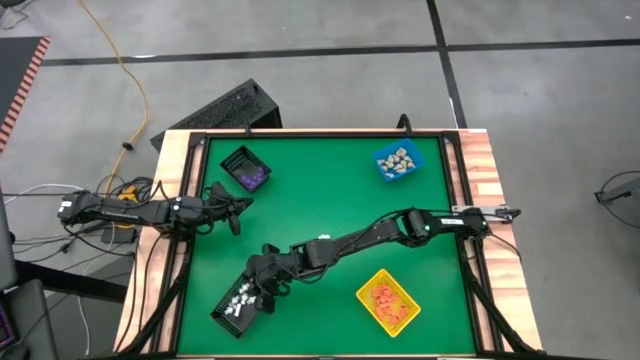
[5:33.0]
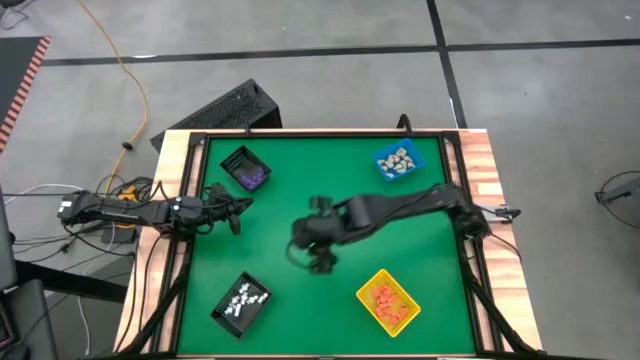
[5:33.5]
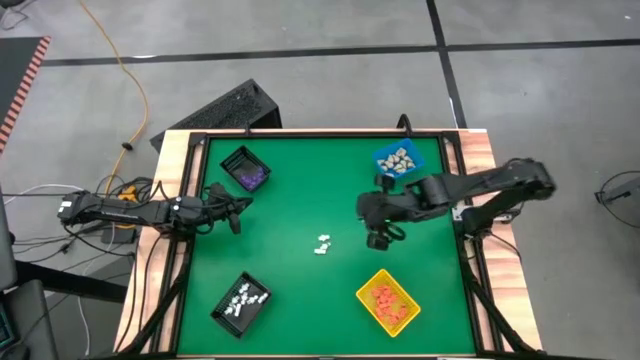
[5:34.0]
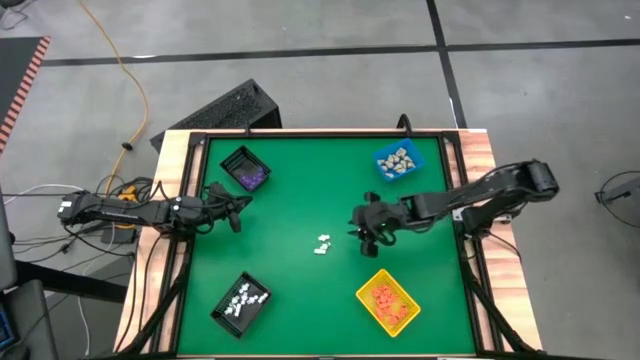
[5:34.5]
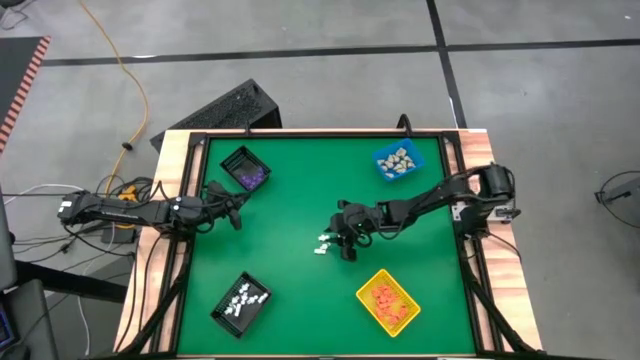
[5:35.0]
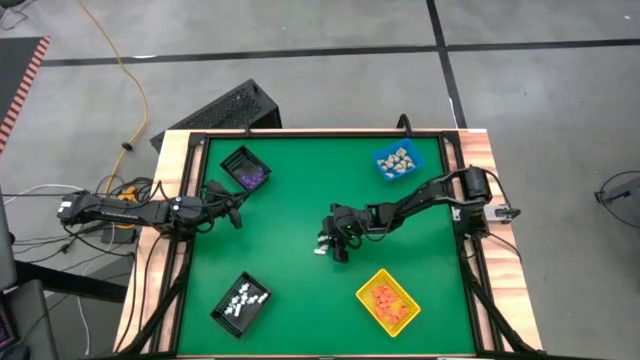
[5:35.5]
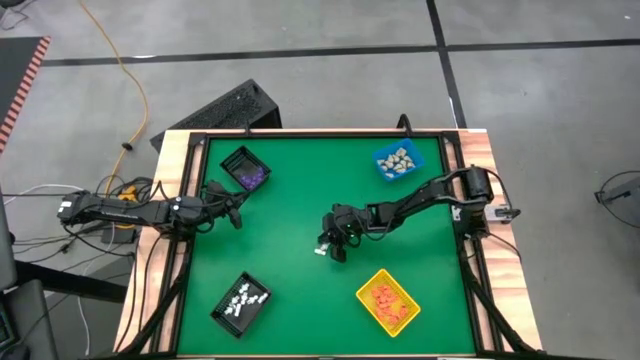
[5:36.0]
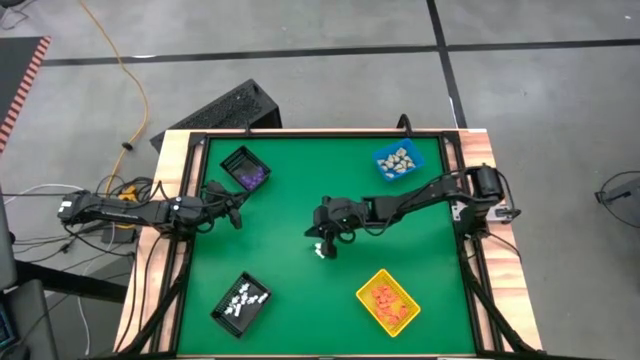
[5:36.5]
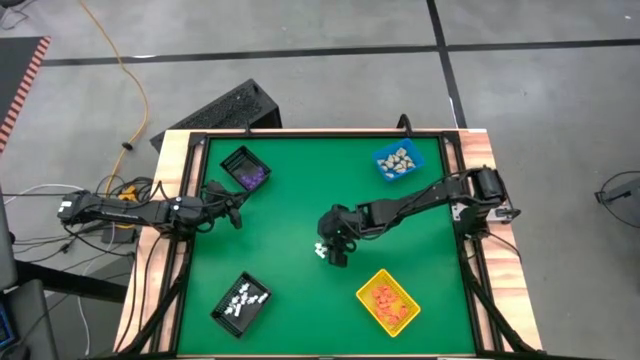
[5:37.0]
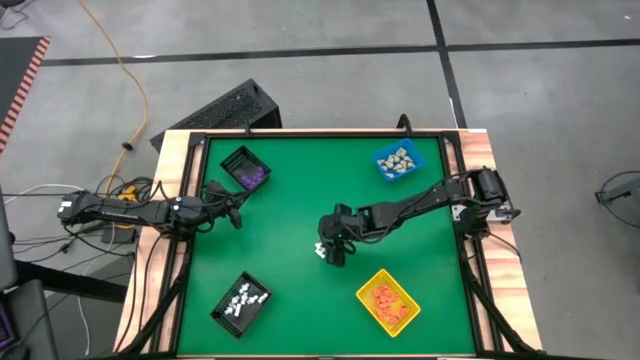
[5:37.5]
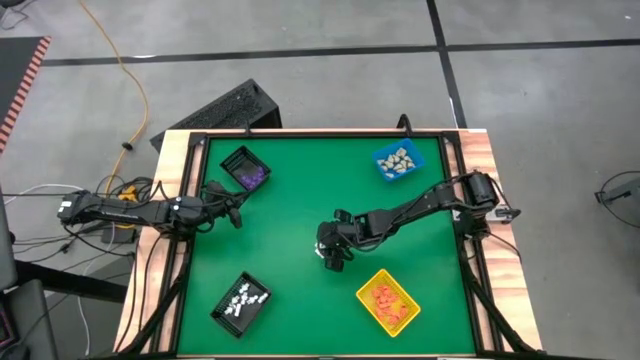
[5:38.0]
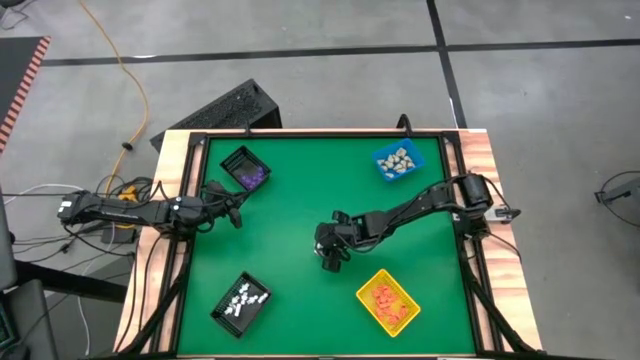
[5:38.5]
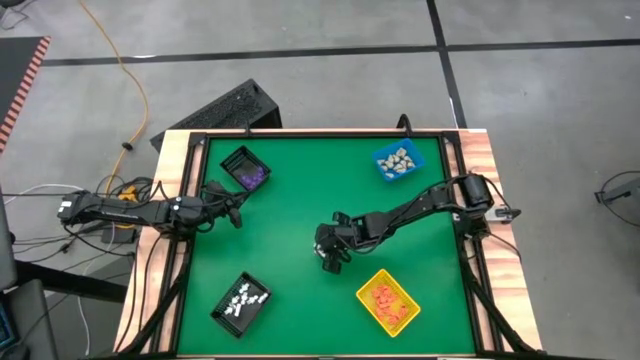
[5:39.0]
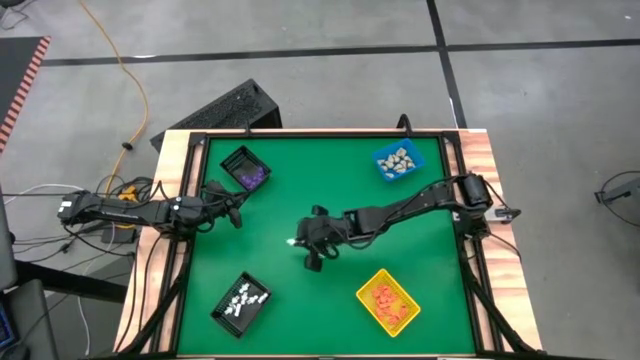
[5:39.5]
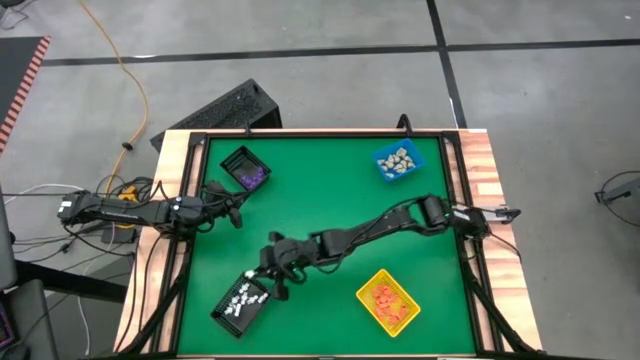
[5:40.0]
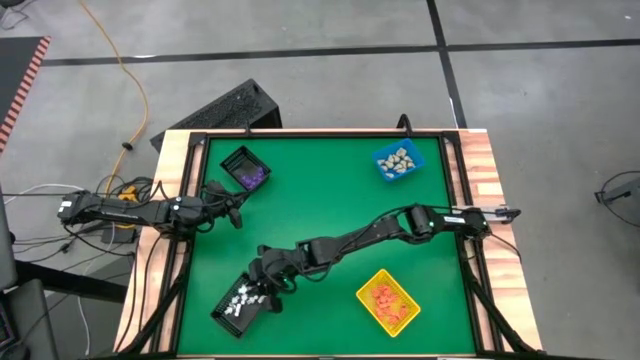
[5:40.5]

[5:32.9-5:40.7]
Task: Sort Halloween decoration
Put the white skeleton toy into the bottom black basket

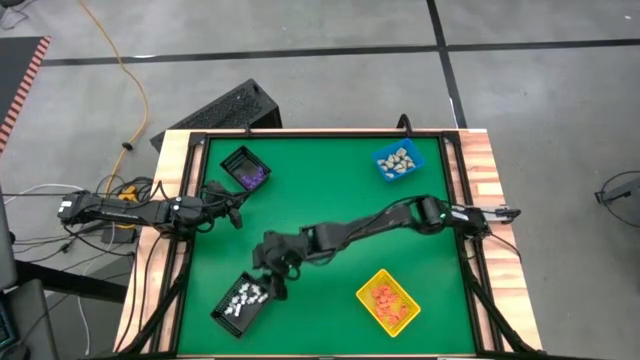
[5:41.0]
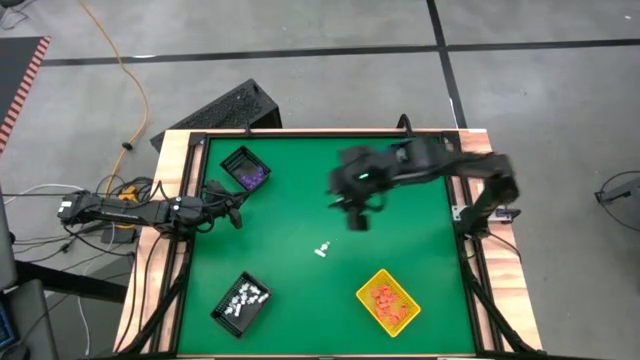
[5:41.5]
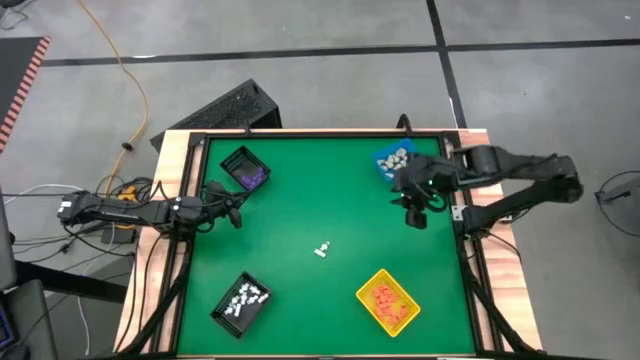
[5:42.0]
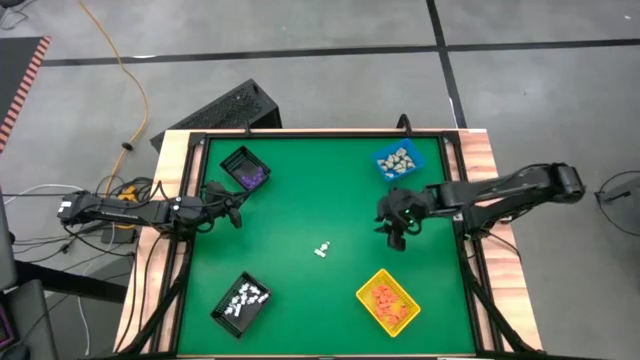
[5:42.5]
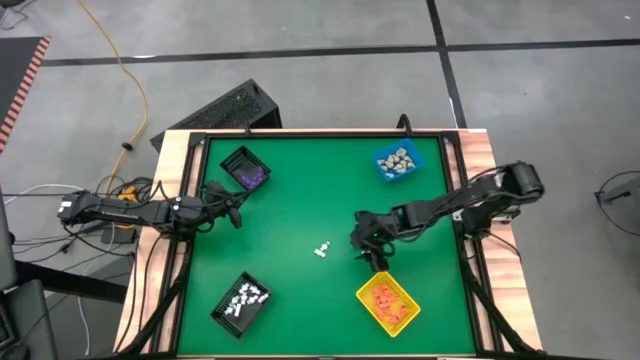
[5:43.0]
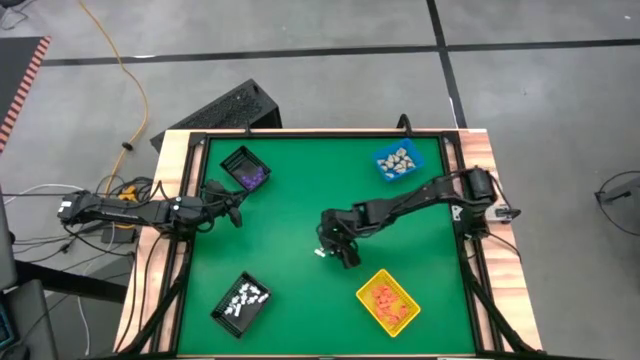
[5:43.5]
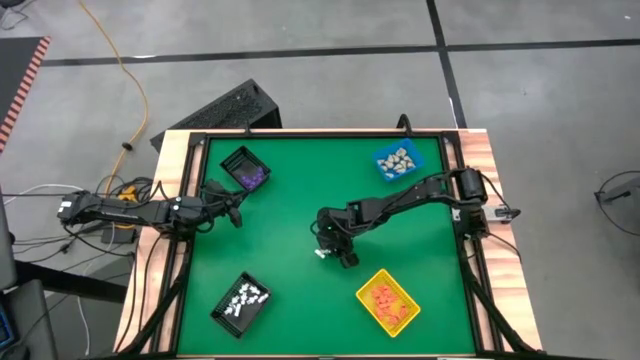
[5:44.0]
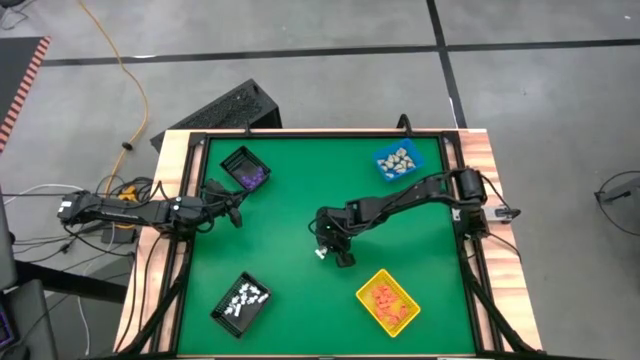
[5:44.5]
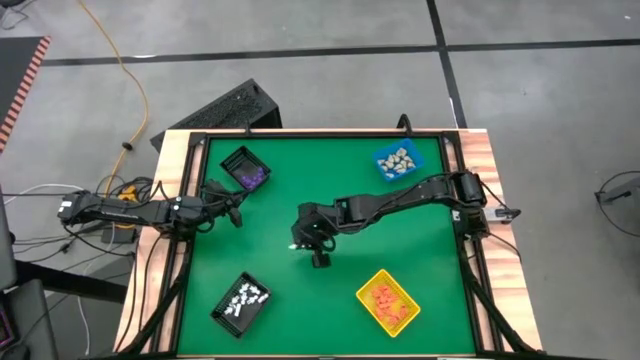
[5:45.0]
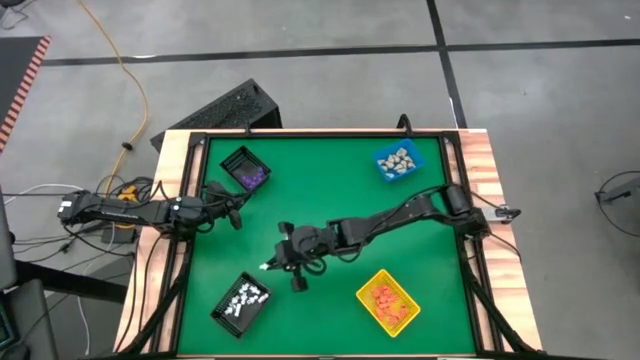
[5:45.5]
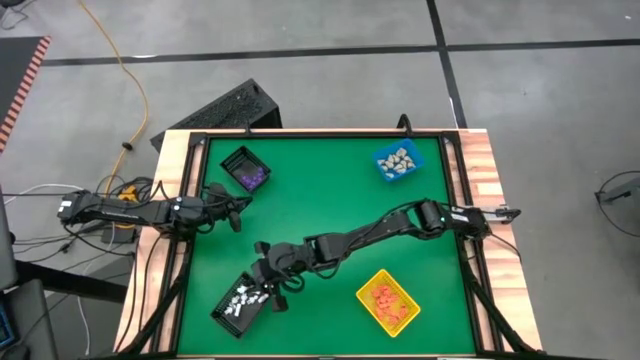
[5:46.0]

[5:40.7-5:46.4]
Put the white skeleton toy into the bottom black basket

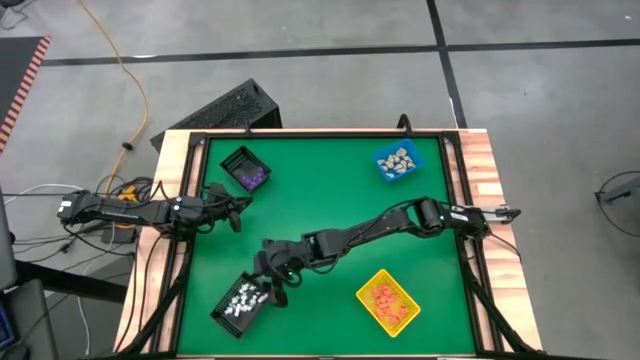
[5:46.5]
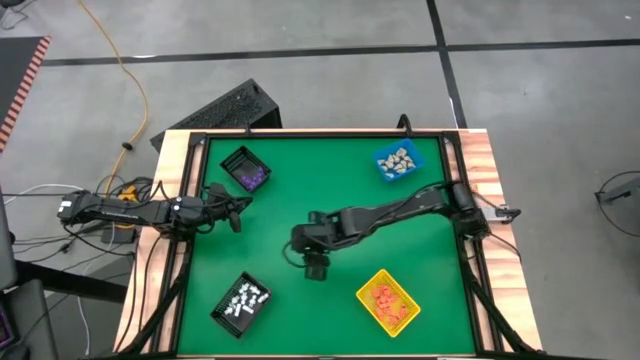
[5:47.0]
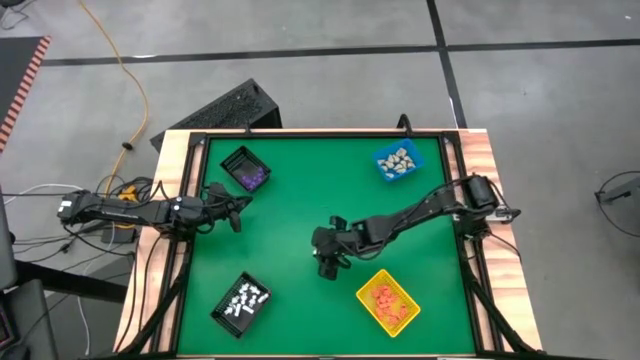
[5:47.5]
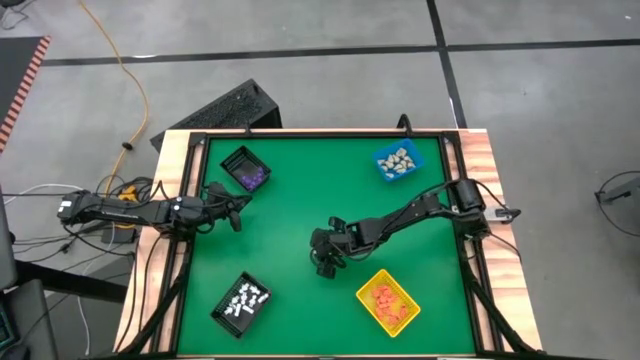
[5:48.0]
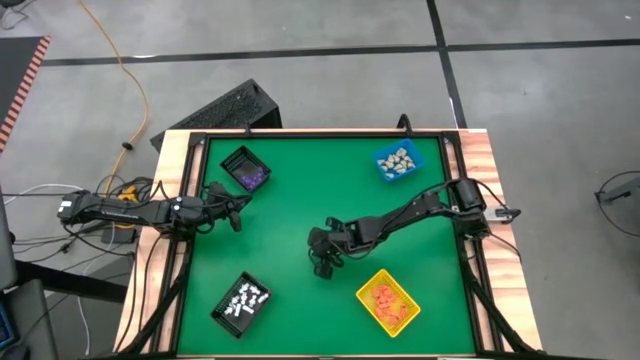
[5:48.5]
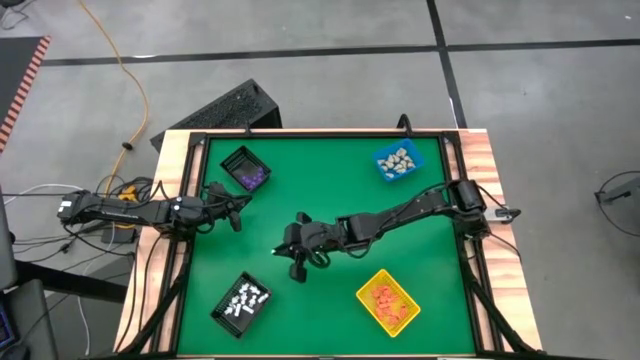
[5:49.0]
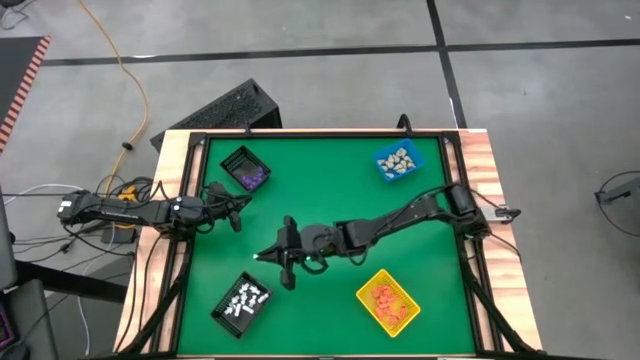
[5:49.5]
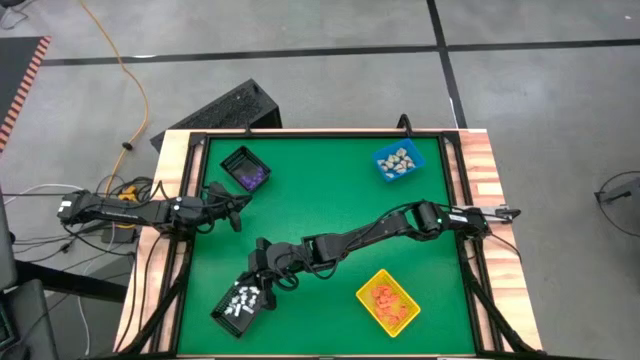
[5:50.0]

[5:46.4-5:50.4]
Put the white skeleton toy into the bottom black basket

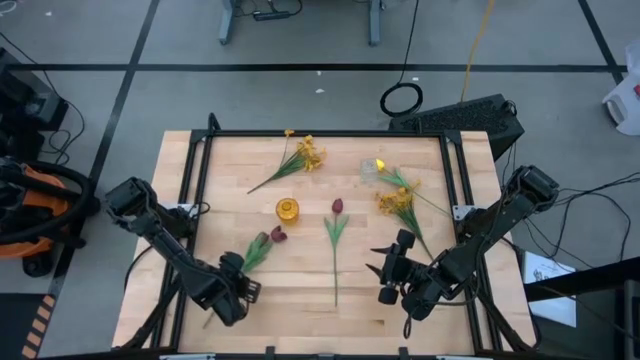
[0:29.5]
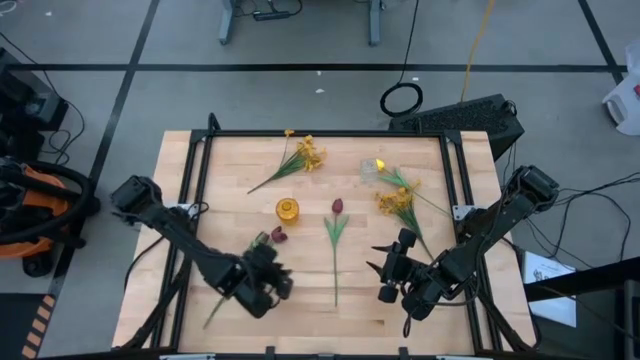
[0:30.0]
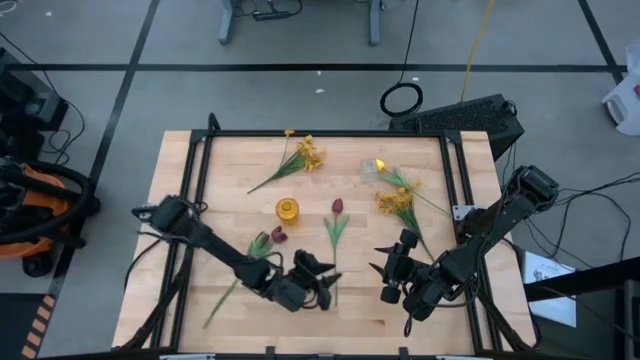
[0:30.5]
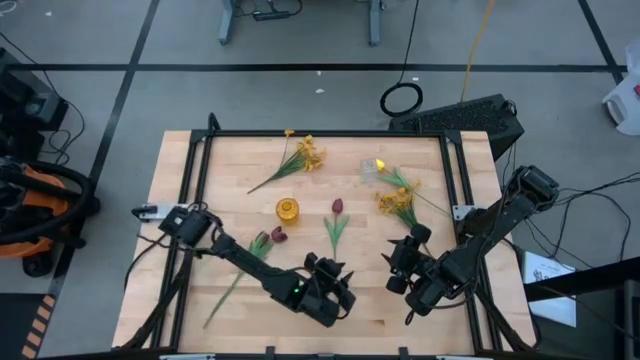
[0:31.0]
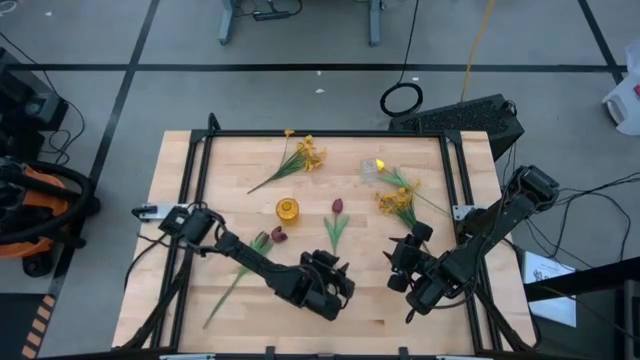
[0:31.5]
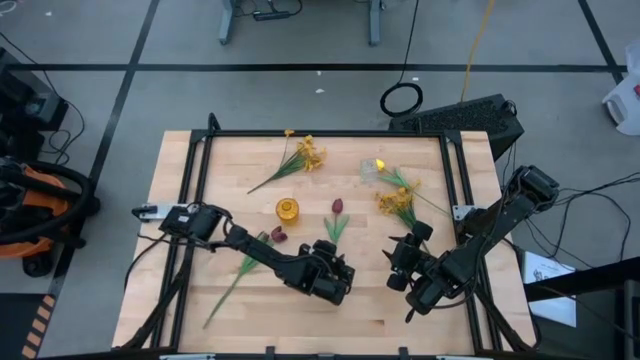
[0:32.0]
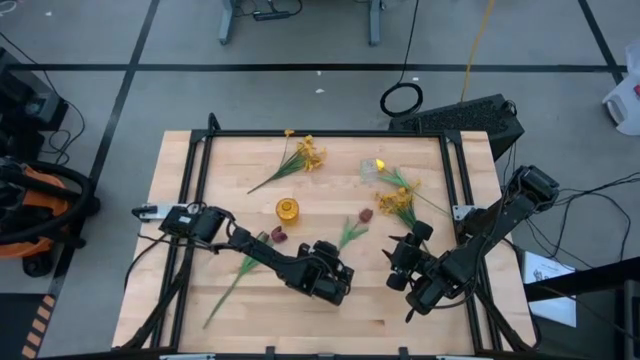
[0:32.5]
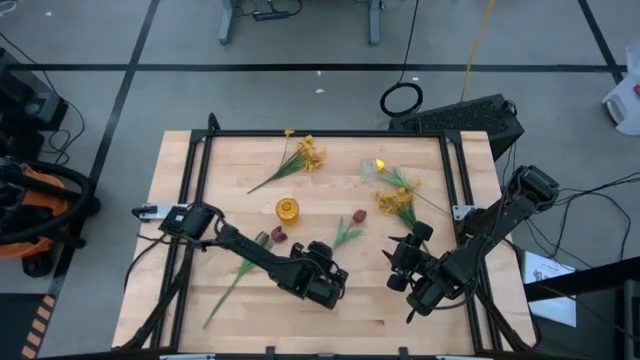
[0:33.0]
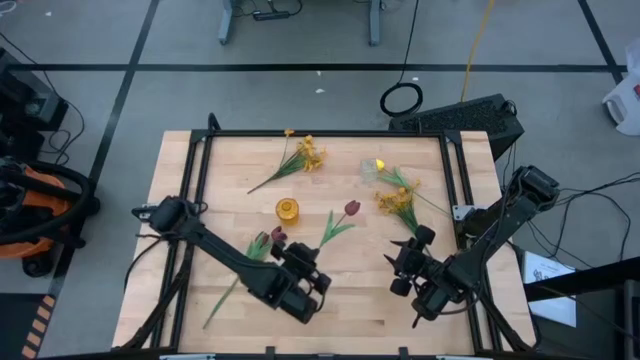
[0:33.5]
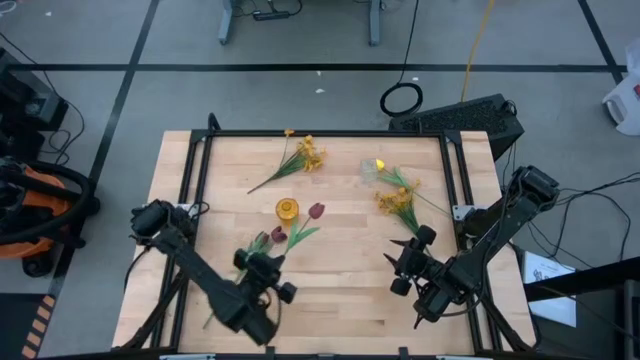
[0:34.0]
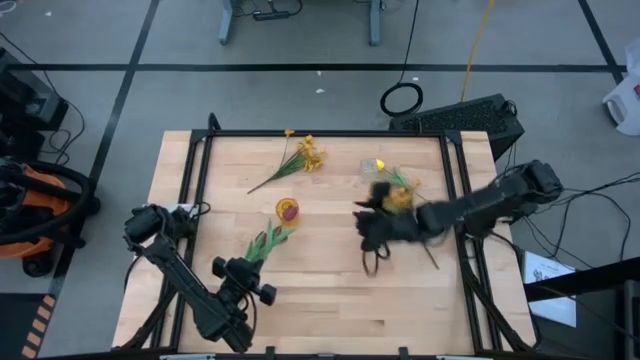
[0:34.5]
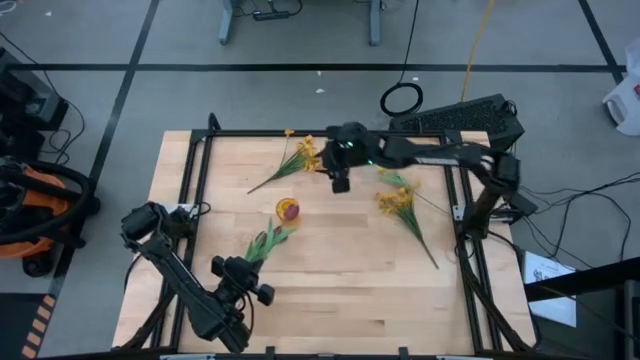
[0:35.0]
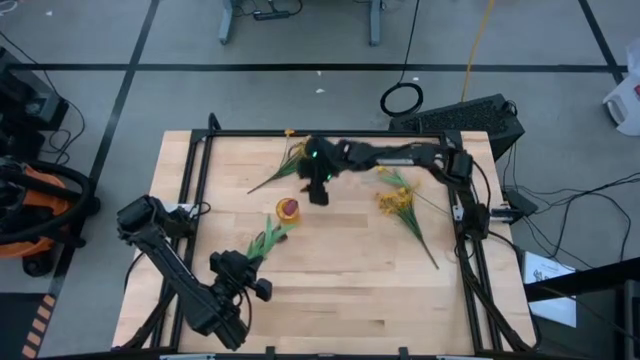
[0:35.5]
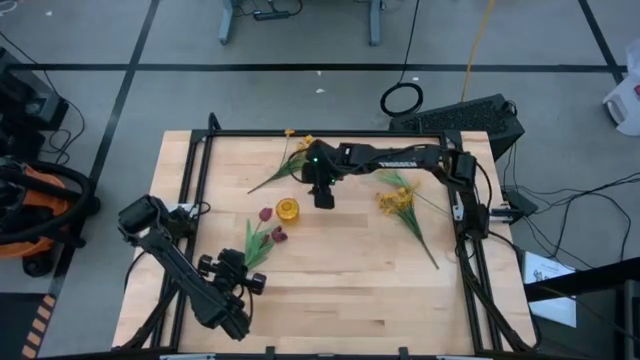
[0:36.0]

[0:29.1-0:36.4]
Task: Sort flowers into vase by color
Move the right violet tulip to the middle left of the table
